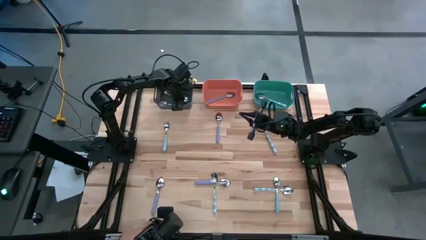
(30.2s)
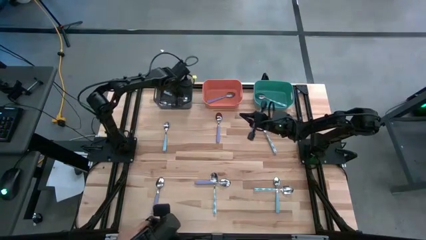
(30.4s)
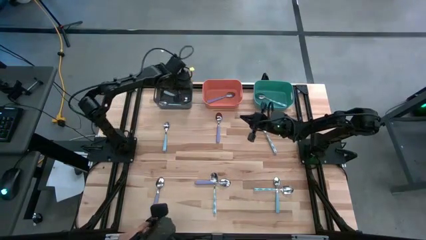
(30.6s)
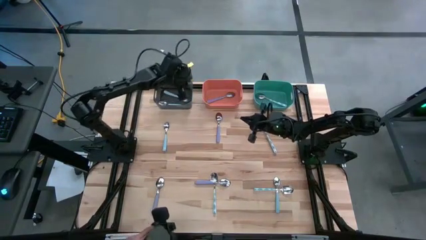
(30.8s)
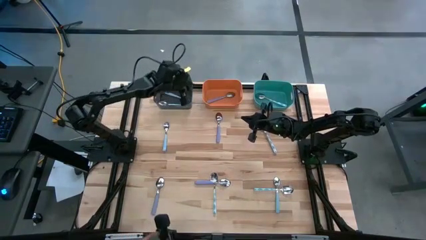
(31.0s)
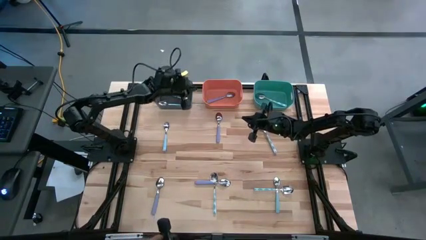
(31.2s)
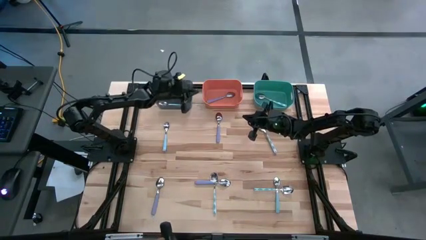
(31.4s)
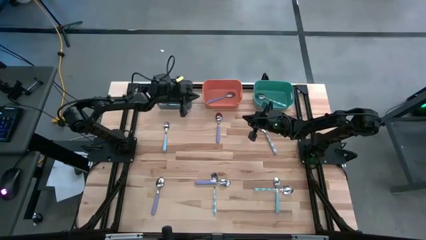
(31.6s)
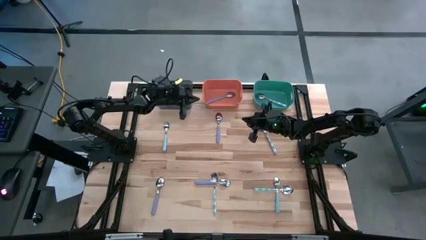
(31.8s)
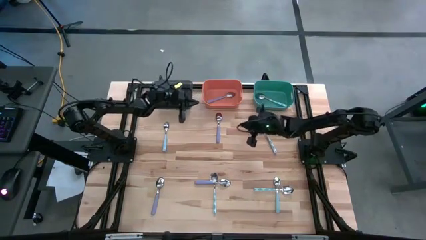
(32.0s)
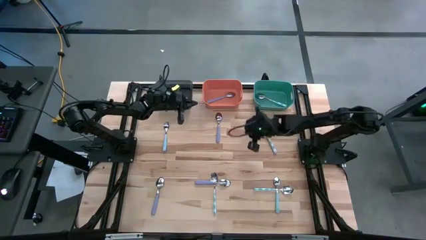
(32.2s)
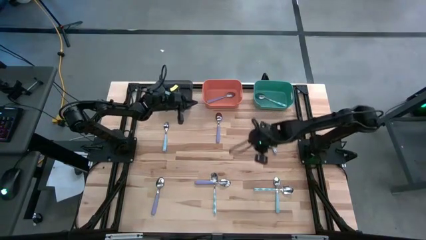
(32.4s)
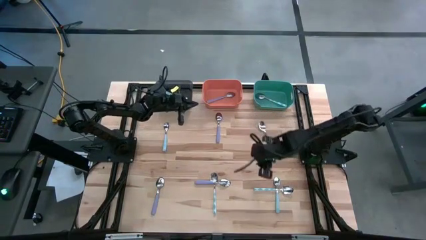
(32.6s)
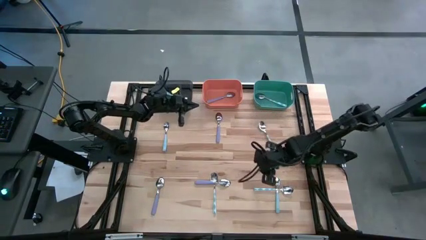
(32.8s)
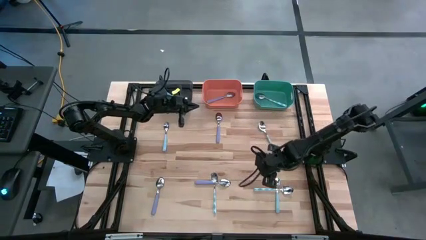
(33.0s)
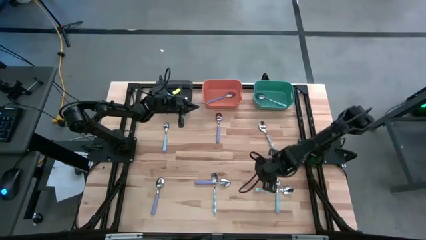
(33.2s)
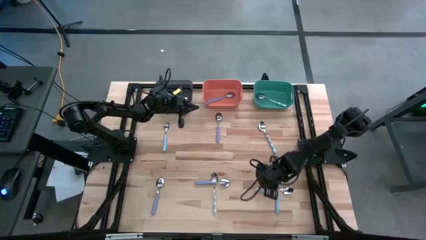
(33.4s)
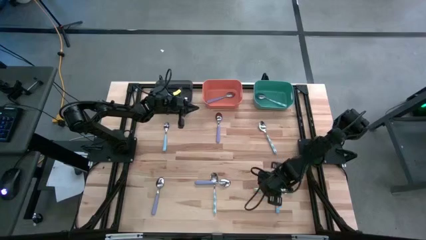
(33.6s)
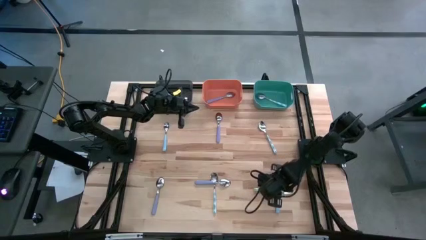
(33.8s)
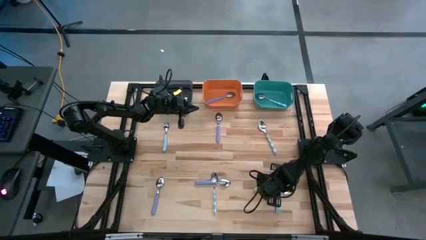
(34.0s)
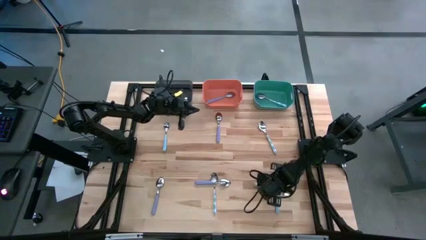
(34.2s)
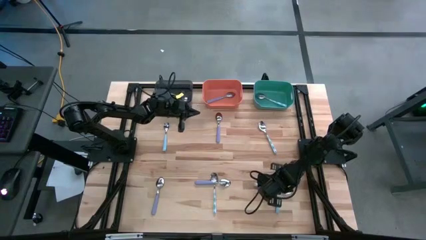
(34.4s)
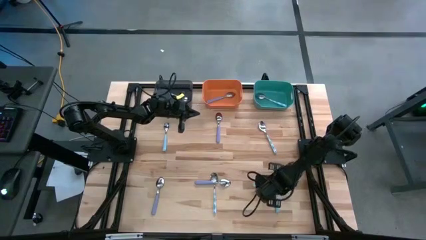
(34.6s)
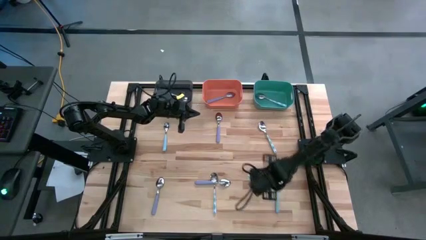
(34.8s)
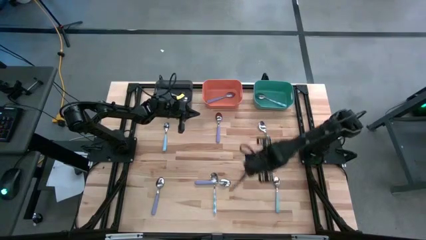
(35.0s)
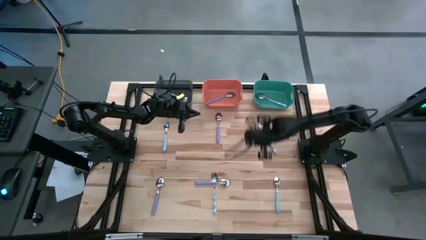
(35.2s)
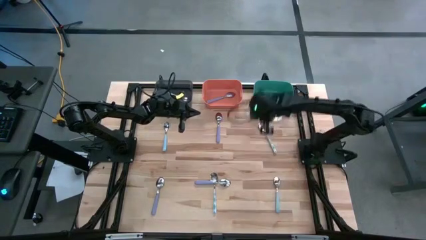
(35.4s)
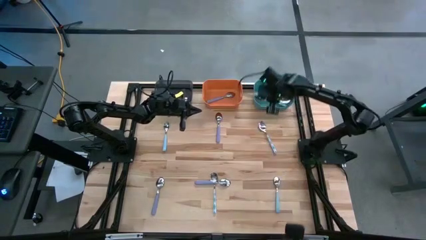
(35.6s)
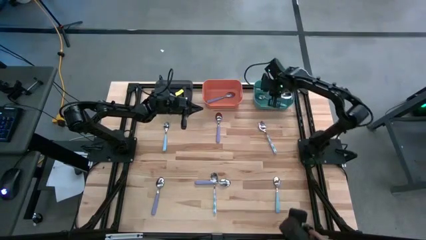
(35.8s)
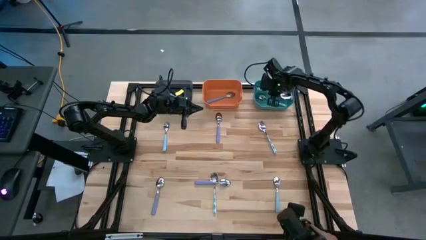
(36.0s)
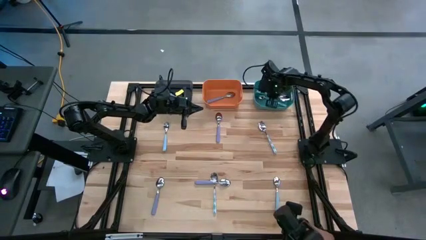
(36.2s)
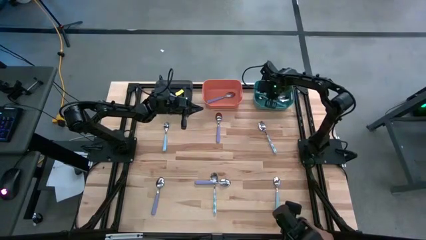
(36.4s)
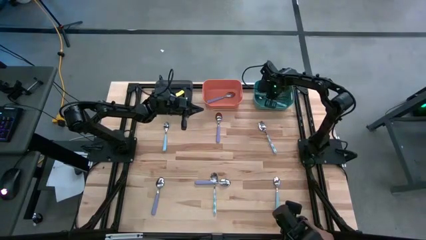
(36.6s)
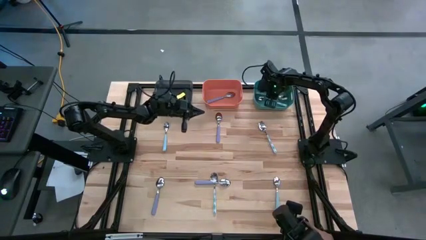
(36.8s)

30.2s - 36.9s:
Task: Sort silverware by color (type)
Put the blue patterned spoon into the green bin

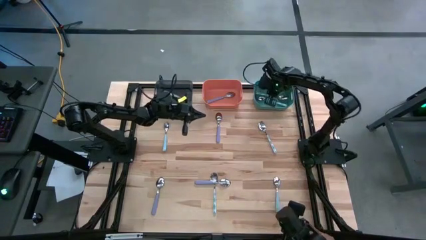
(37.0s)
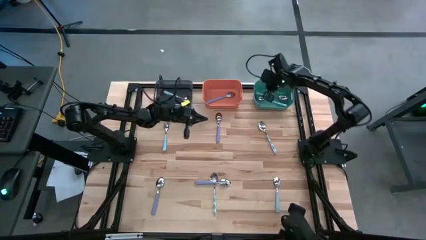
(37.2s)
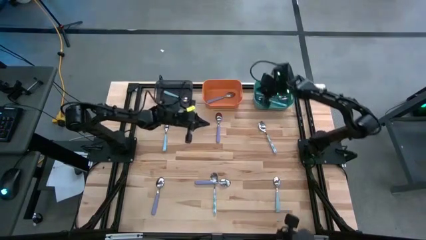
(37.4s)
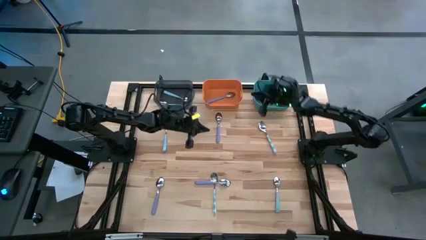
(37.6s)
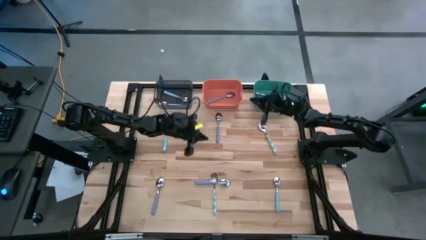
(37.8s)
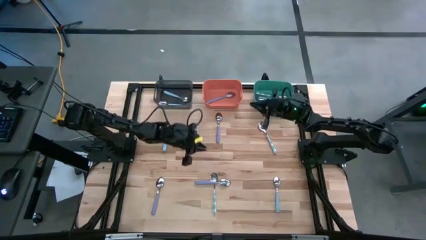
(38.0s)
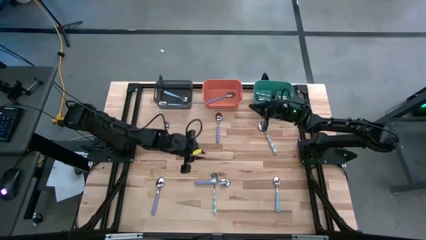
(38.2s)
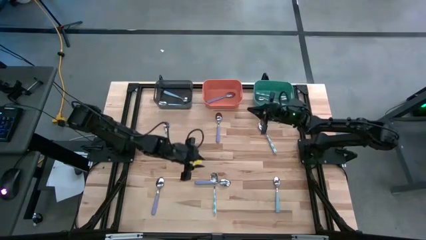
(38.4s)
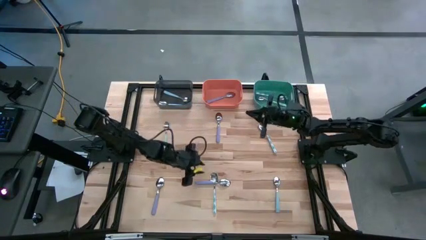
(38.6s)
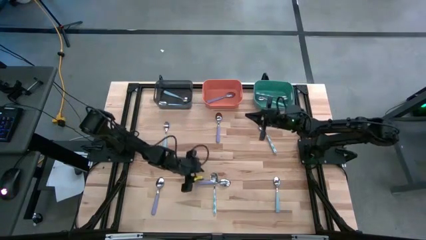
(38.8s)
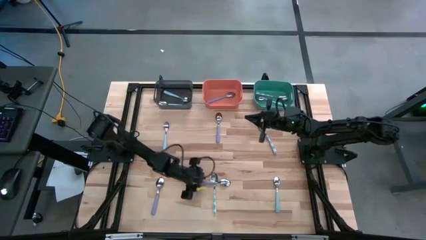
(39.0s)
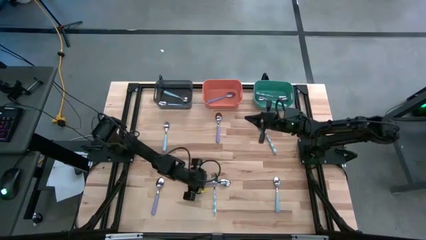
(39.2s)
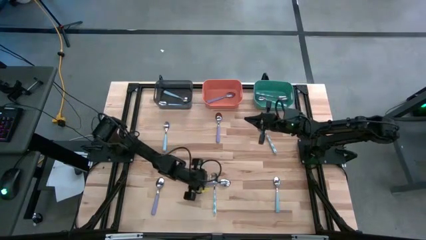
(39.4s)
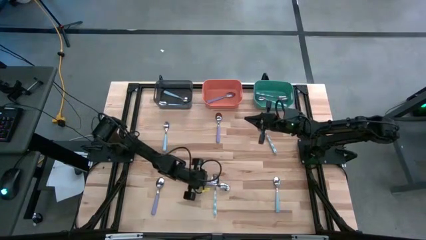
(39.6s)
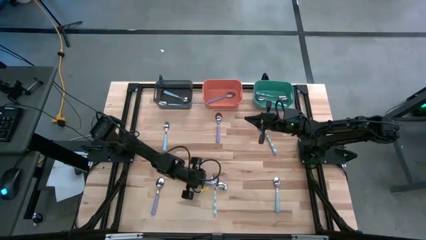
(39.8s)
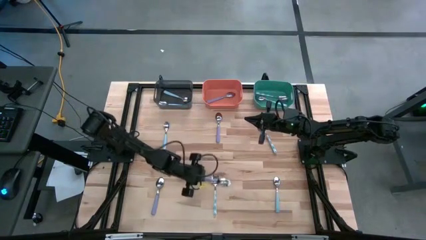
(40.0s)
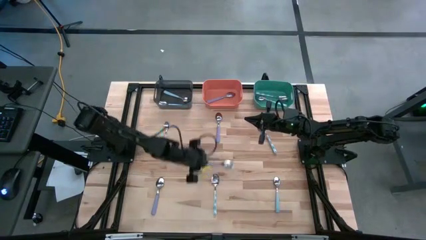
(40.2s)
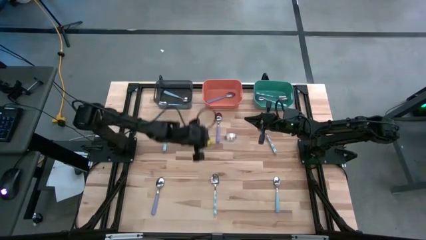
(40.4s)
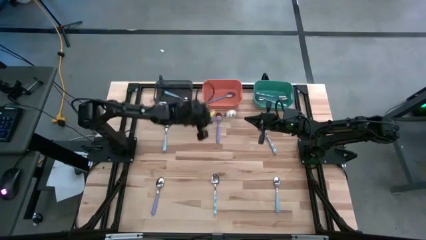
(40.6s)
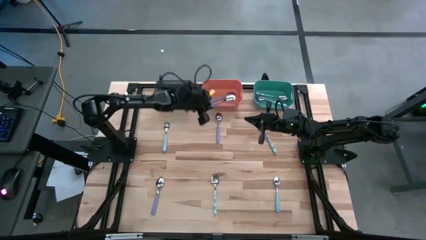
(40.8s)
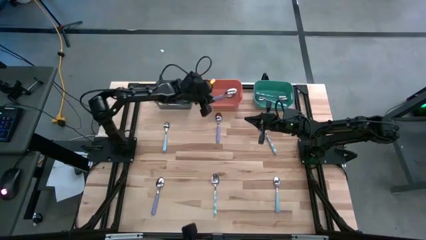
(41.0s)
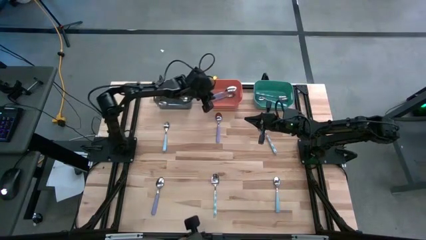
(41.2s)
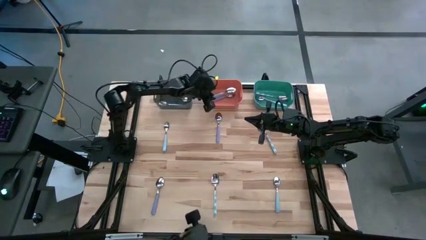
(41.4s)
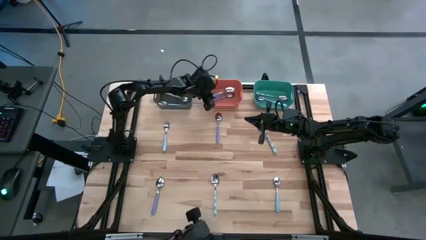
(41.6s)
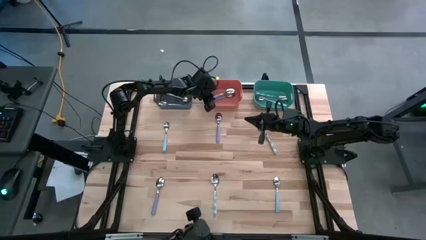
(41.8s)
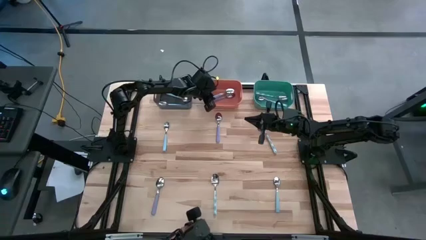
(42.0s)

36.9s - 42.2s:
Put the purple spoon into the orange bin

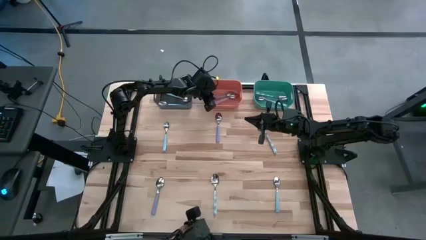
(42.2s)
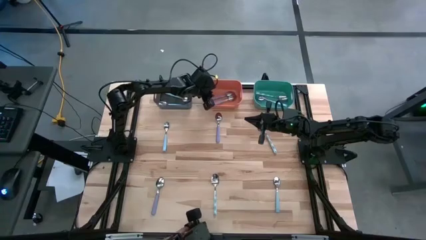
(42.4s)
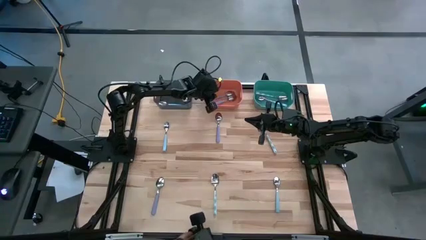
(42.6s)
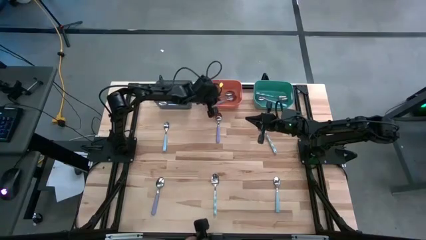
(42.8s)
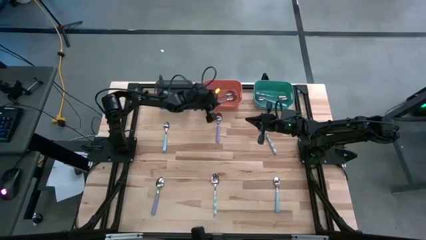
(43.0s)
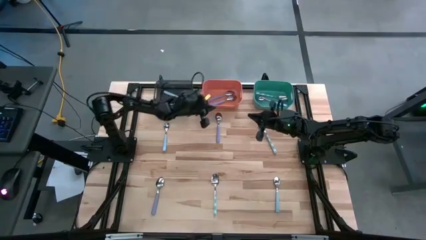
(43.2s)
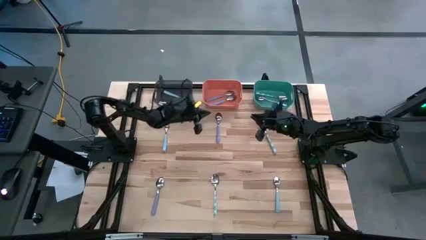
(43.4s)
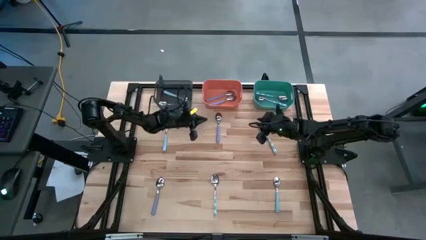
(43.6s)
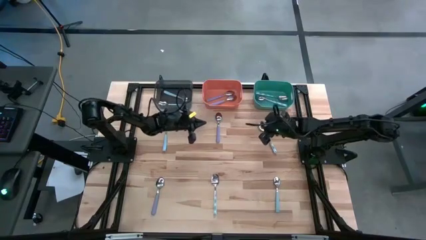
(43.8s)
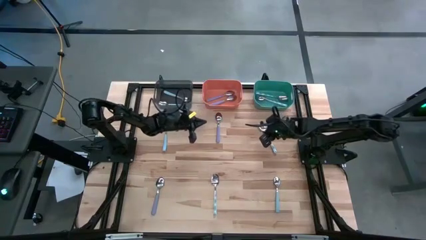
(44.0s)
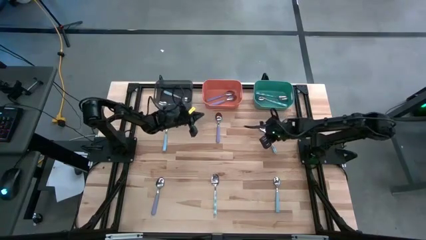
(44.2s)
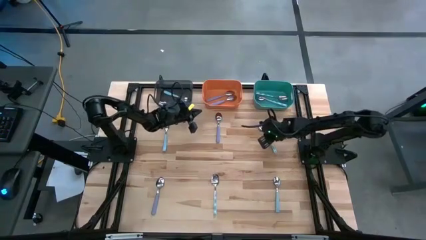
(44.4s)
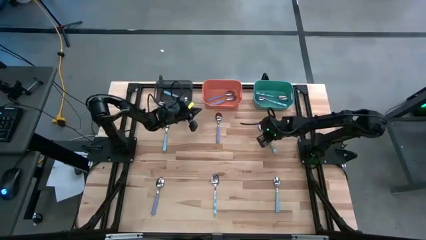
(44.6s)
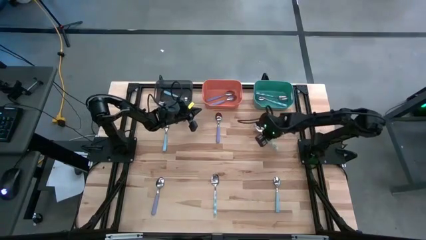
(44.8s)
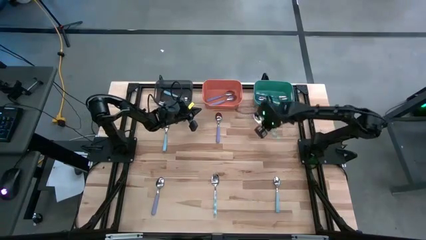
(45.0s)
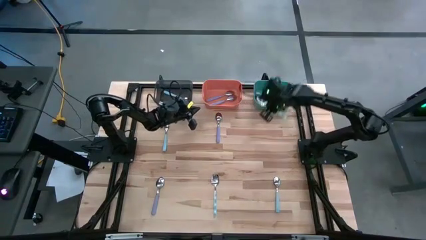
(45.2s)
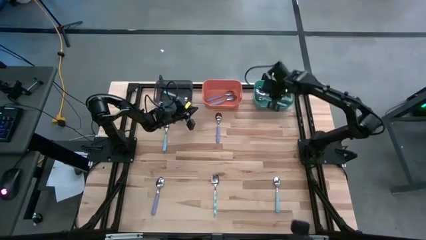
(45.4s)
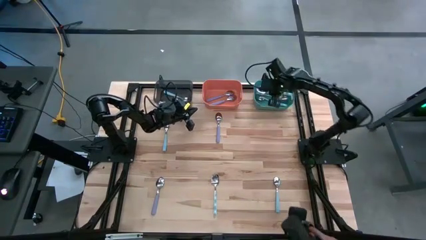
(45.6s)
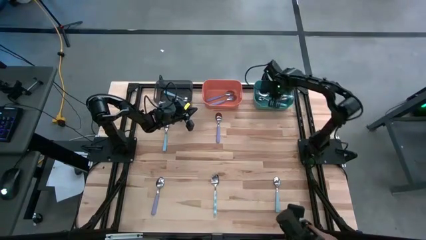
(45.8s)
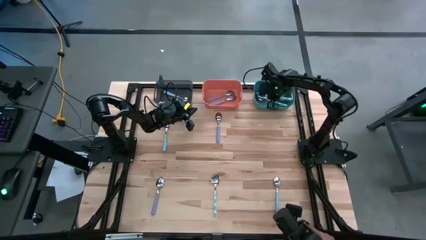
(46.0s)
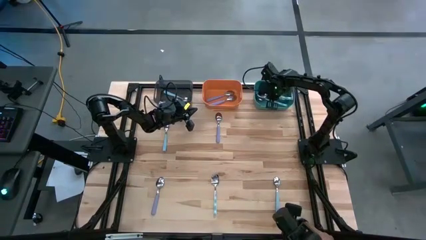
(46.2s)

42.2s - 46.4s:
Put the blue patterned spoon into the green bin
